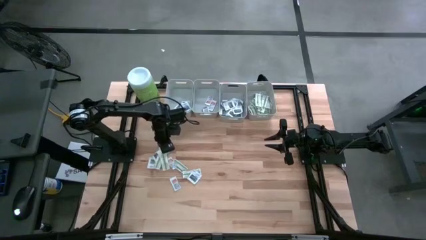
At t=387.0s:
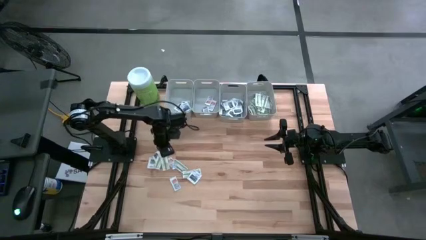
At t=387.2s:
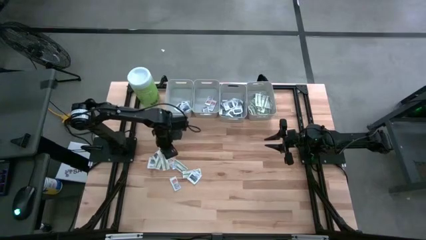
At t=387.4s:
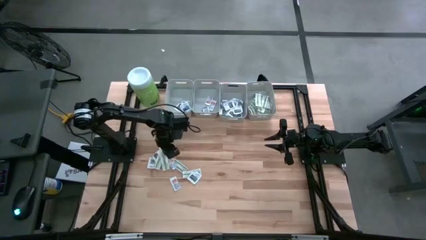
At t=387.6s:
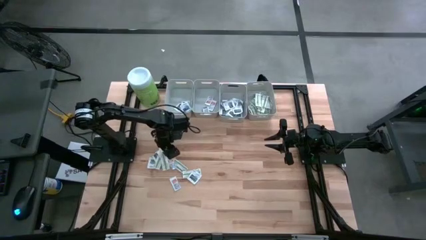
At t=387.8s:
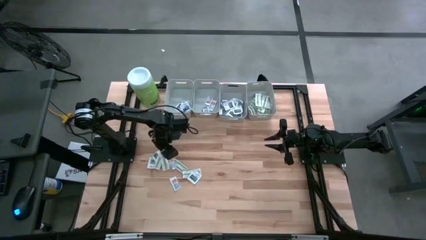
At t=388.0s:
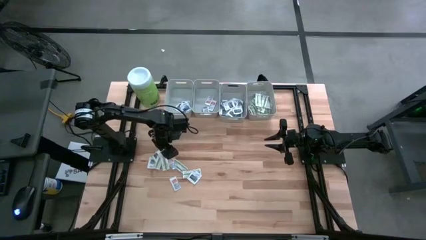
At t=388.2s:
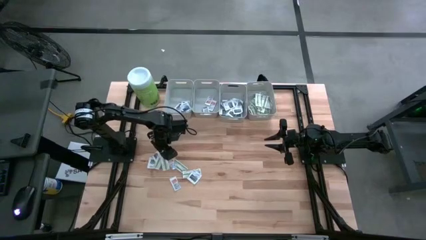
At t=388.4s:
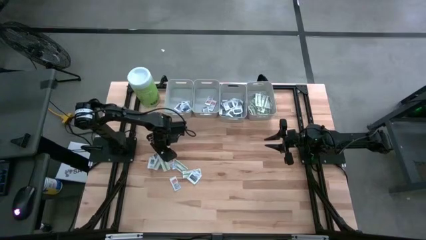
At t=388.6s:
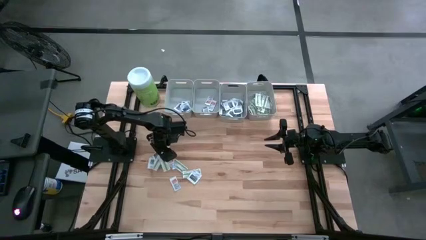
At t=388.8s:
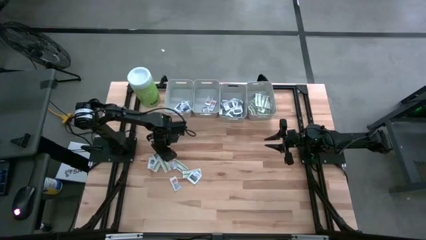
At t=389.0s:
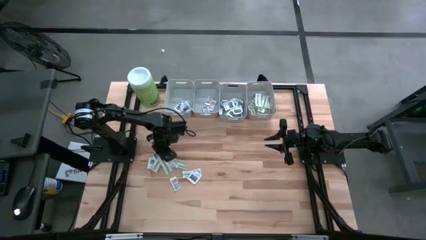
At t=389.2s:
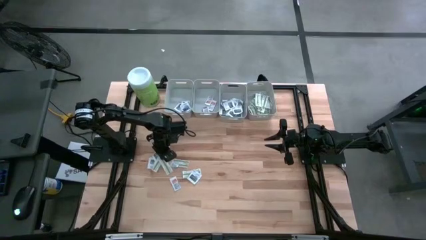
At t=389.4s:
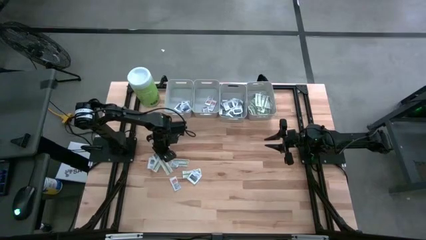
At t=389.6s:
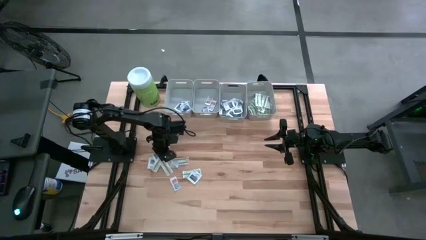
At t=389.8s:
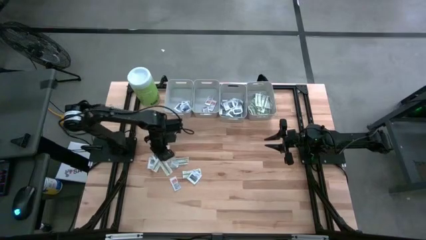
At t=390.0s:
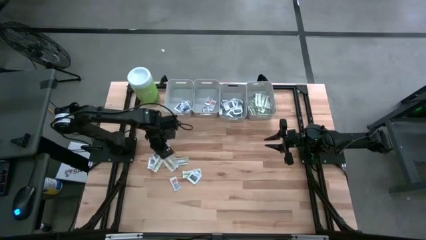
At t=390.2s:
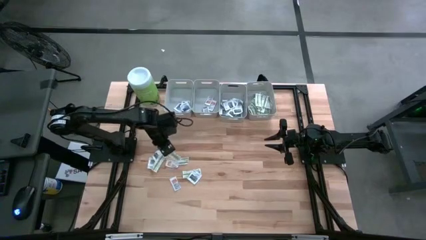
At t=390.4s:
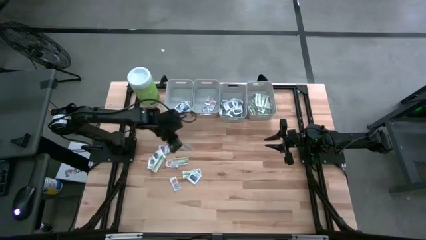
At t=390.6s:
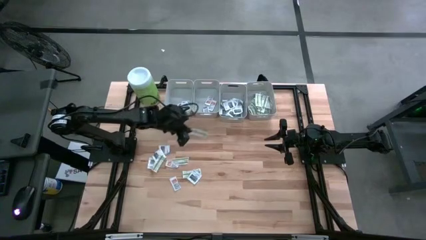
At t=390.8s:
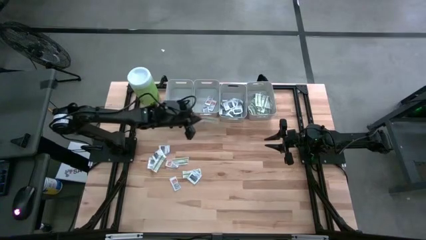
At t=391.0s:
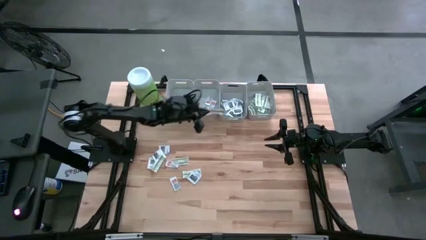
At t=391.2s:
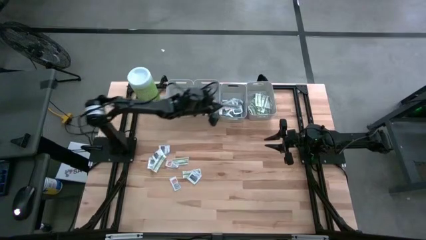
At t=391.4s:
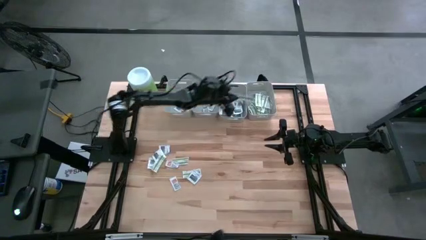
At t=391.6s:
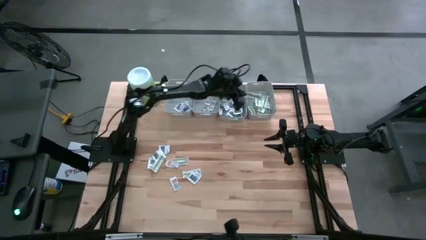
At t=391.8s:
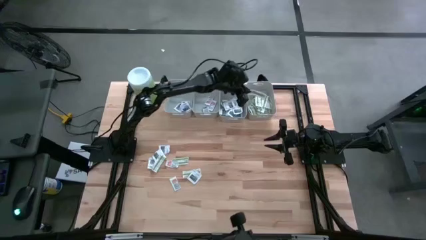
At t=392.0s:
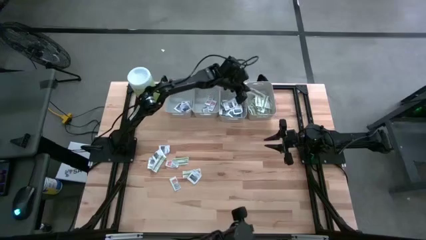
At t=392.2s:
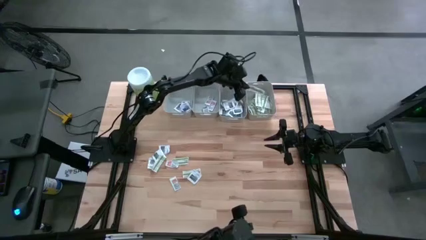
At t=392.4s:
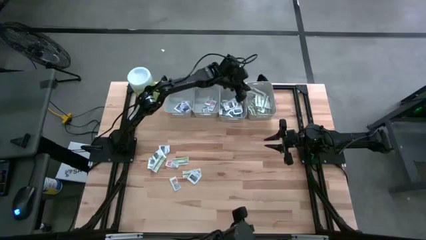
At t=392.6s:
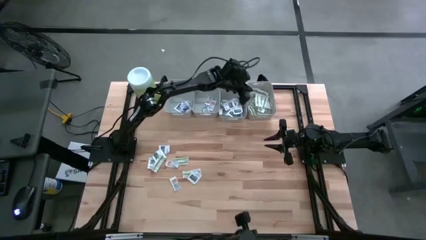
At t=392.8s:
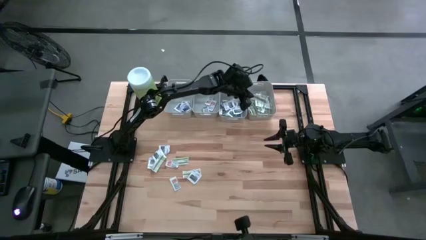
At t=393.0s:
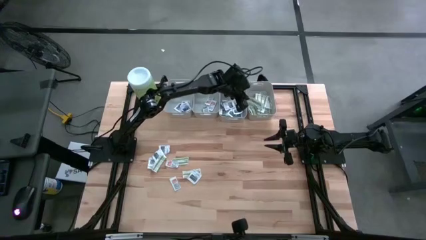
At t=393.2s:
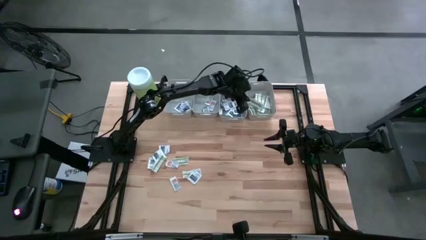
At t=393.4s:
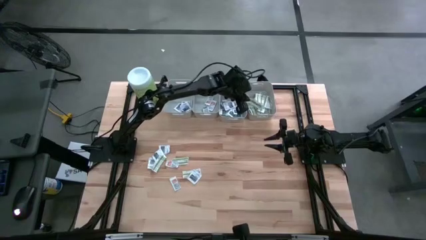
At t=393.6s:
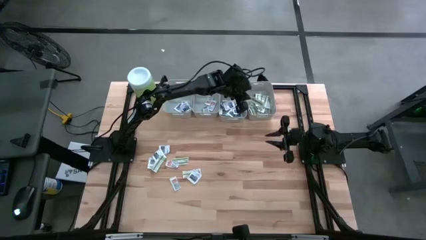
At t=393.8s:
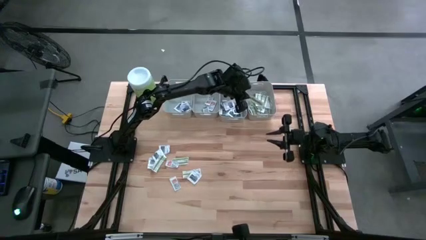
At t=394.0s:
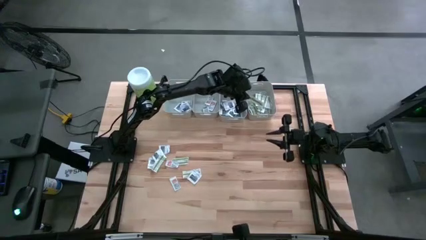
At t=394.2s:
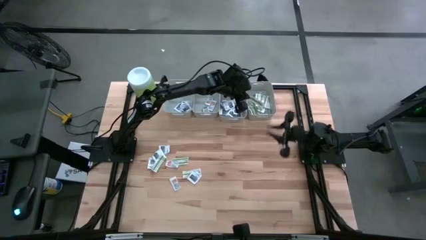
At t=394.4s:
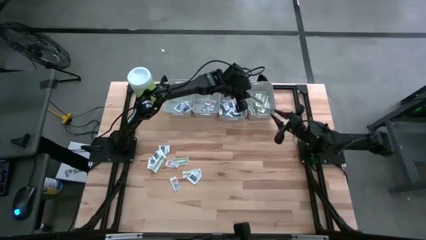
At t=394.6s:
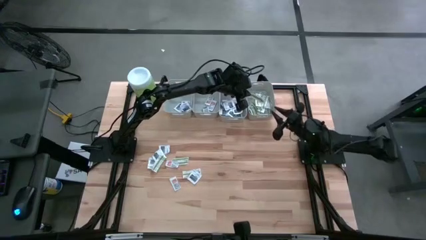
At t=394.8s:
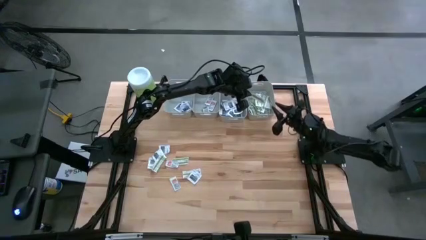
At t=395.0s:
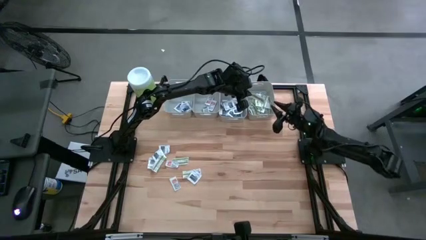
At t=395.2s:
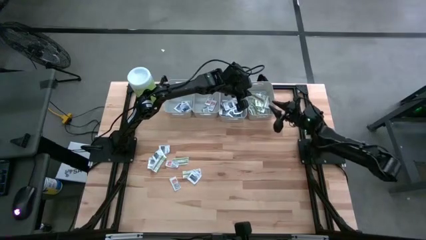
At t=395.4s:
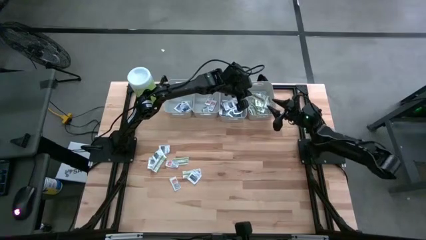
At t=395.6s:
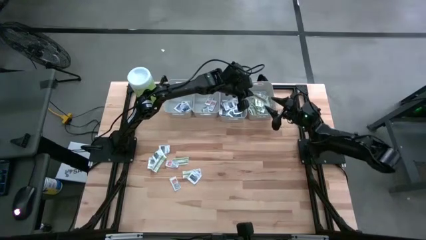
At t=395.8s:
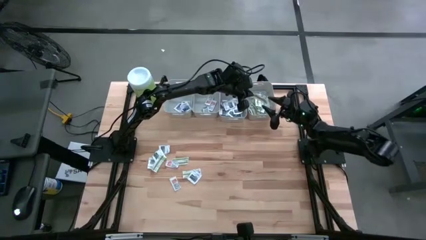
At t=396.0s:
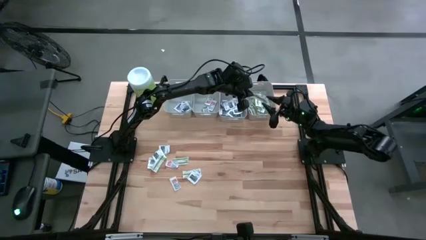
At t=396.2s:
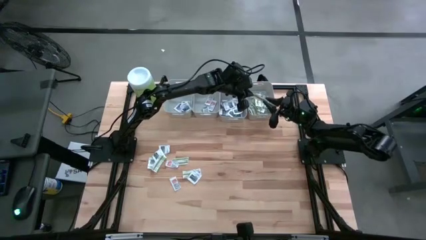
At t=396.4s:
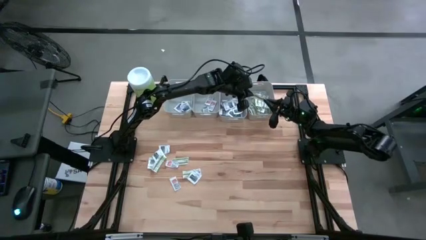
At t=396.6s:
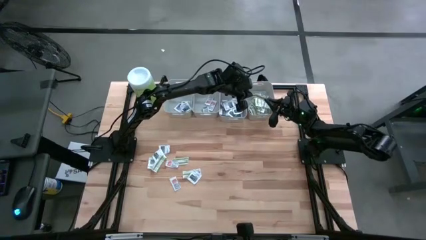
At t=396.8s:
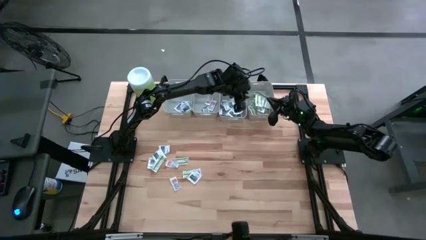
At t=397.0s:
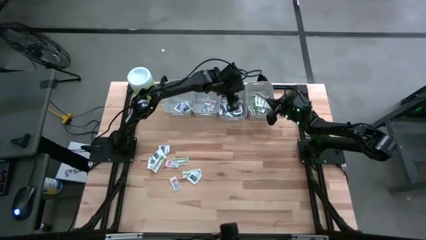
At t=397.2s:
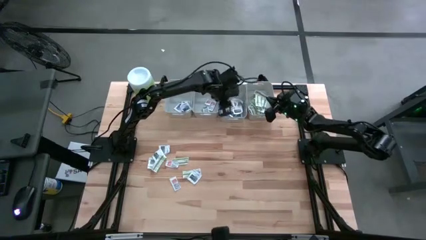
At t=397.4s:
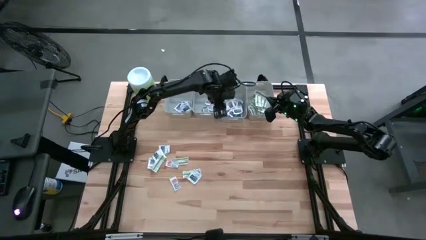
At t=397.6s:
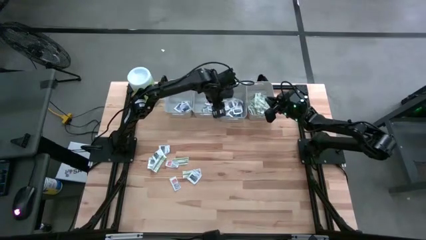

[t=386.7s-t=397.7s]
Task: Pick & Place First Aid Supplies
Put the bandage into the right gray bin

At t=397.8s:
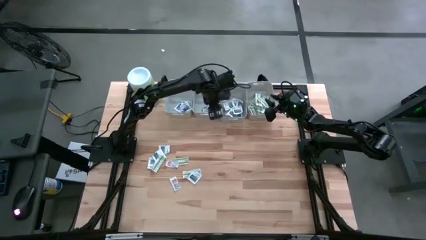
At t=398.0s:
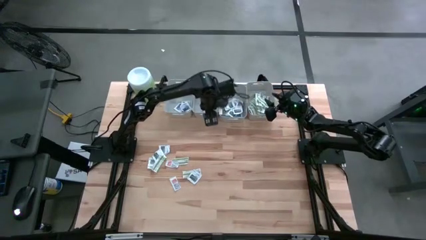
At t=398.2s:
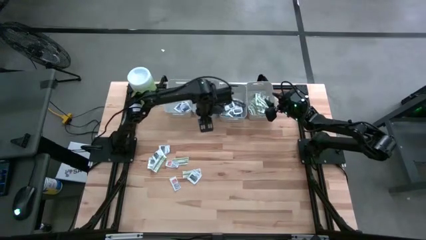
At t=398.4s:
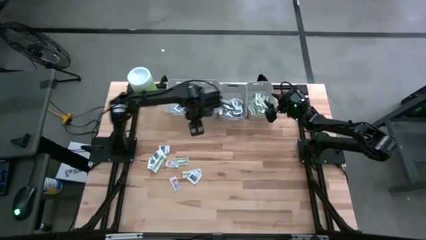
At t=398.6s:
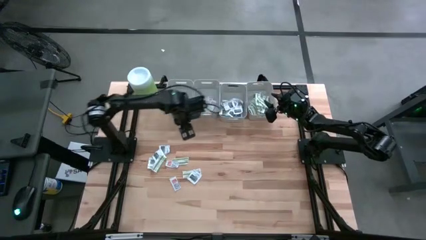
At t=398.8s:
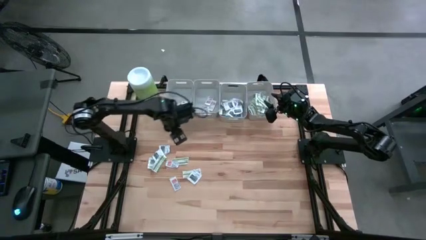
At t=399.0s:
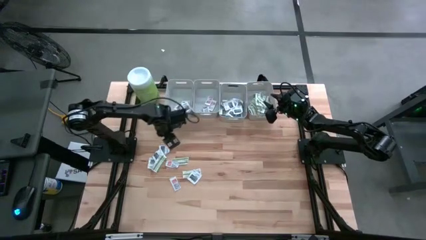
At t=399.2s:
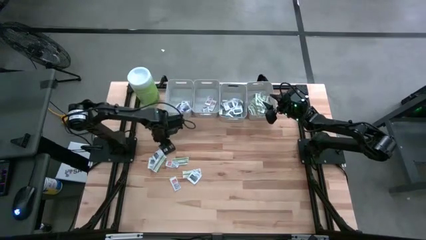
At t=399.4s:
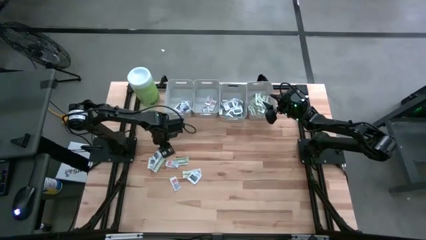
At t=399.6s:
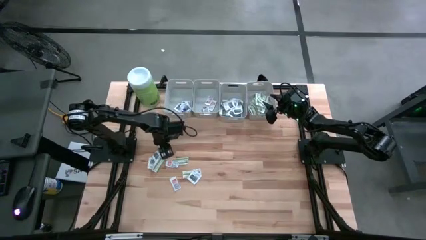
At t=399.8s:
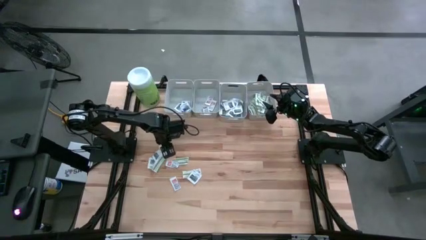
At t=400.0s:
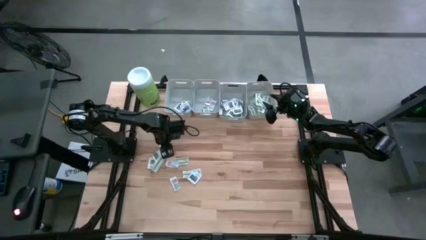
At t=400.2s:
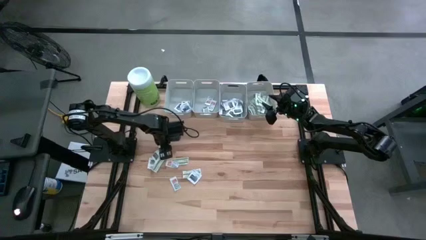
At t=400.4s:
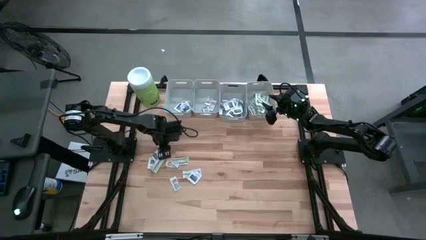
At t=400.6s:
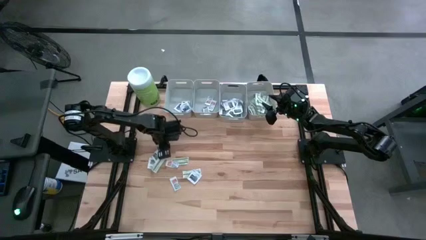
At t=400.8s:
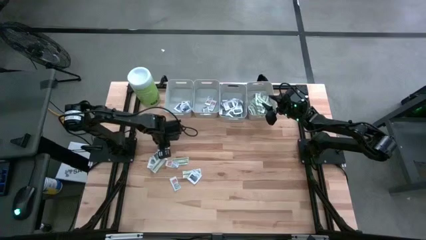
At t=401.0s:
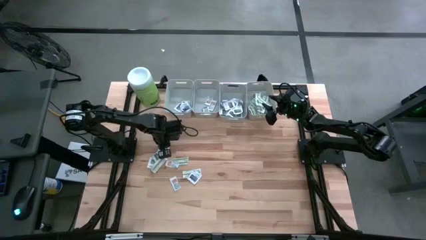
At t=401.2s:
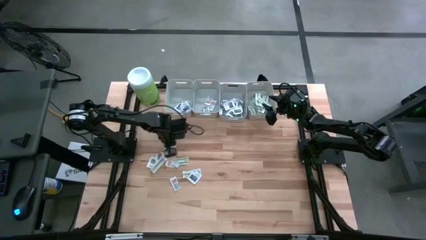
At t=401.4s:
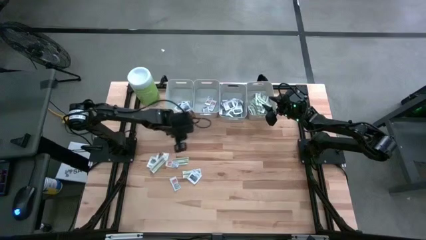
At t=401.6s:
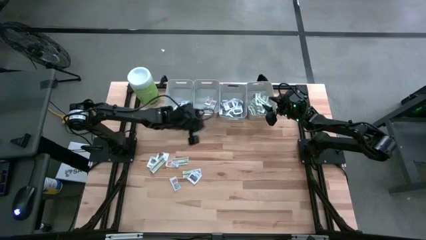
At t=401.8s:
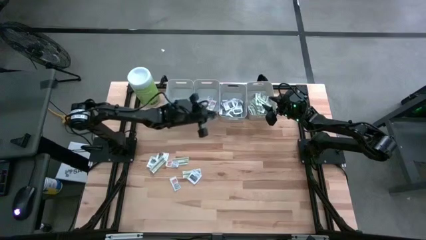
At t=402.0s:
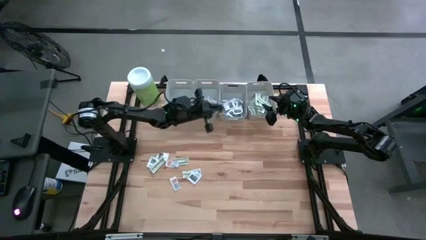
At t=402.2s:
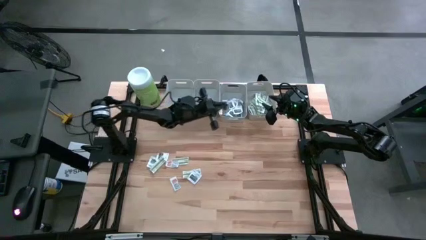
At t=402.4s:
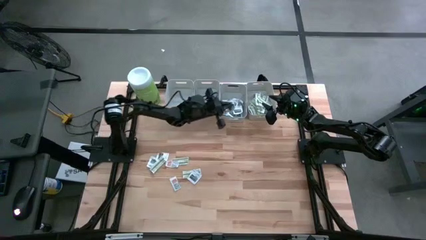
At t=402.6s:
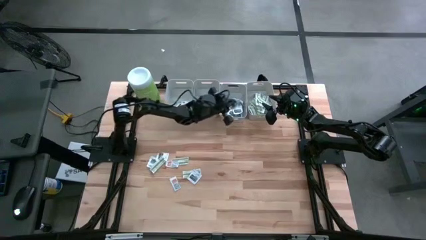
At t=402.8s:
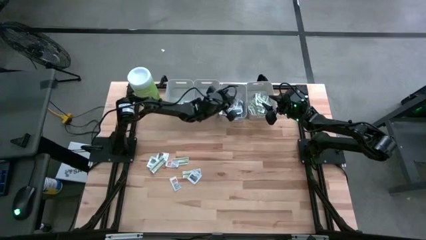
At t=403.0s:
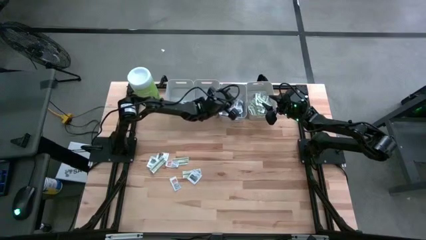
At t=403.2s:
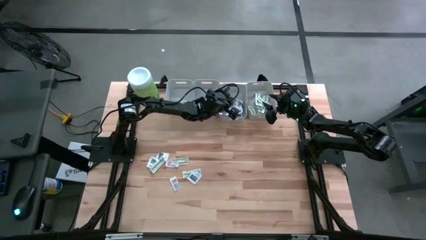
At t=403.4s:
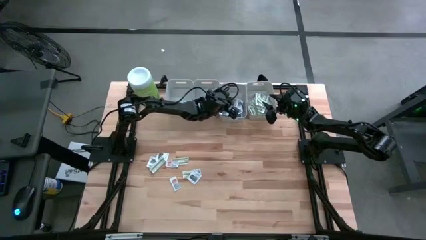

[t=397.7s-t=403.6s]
Put the towelette pack into the middle right gray bin
